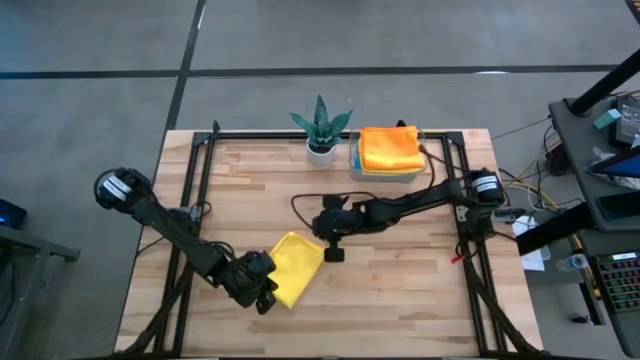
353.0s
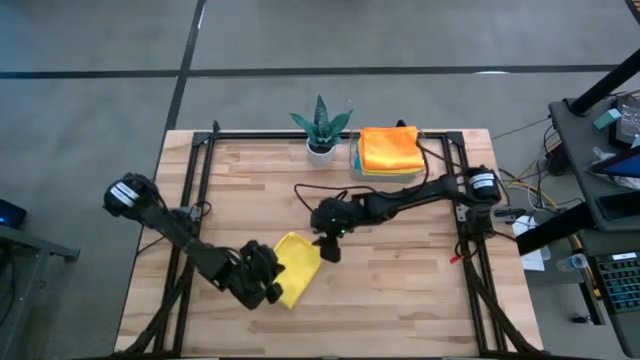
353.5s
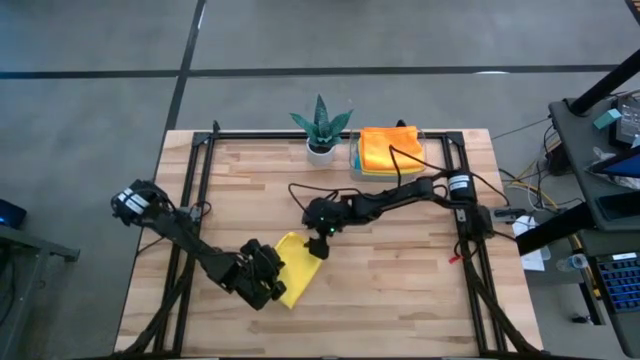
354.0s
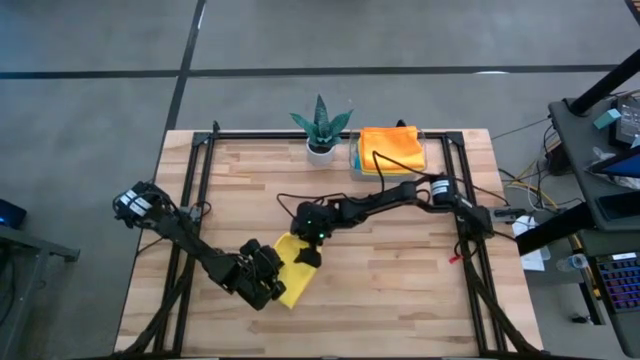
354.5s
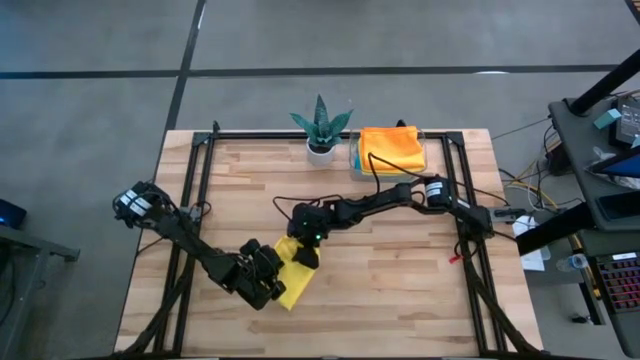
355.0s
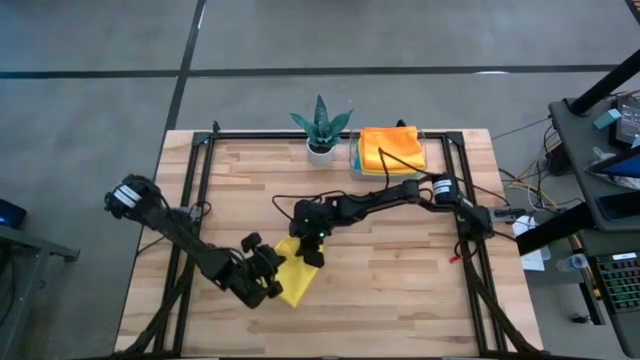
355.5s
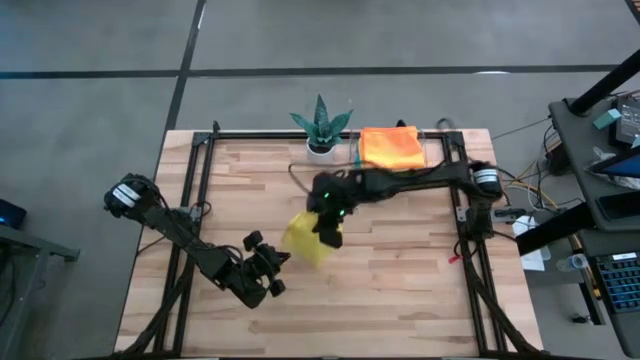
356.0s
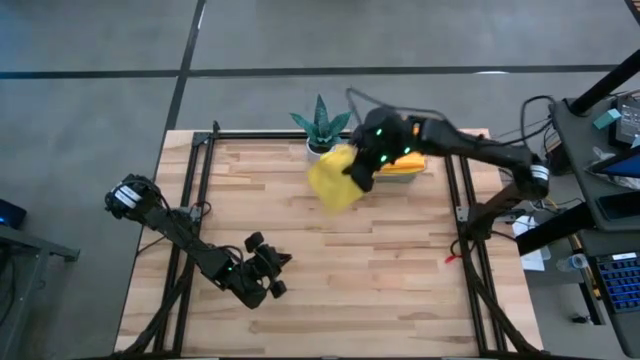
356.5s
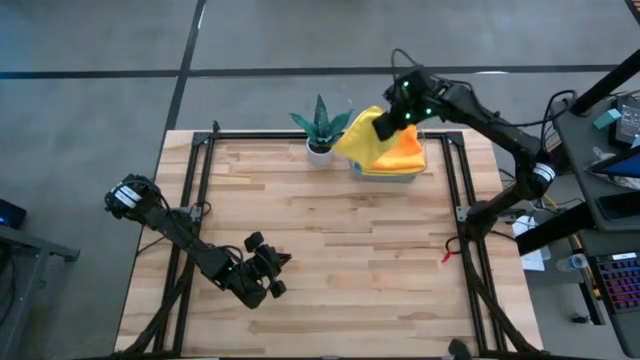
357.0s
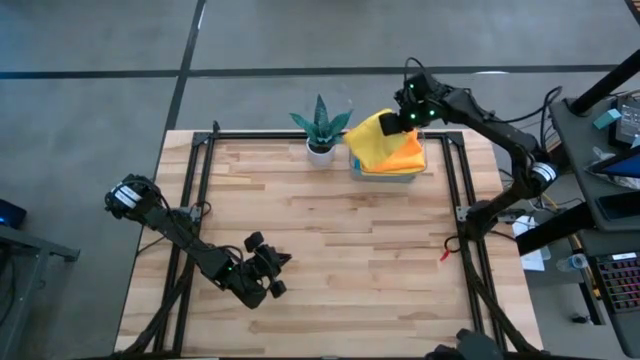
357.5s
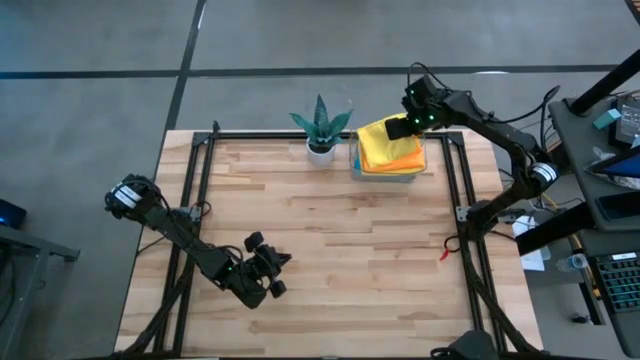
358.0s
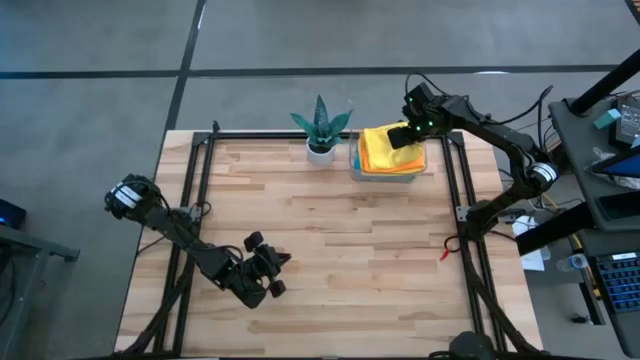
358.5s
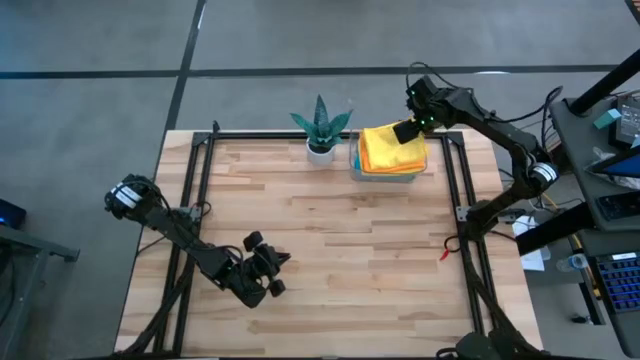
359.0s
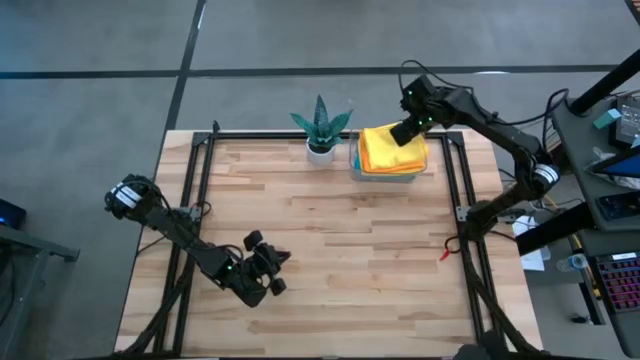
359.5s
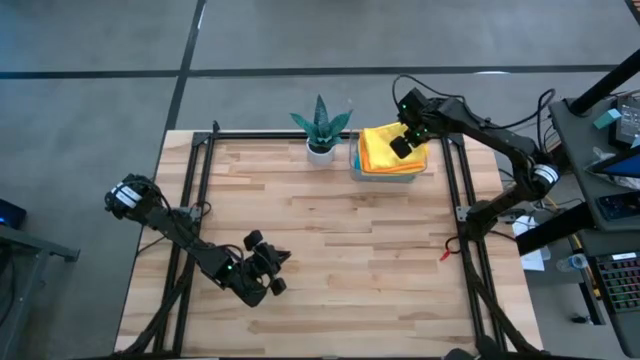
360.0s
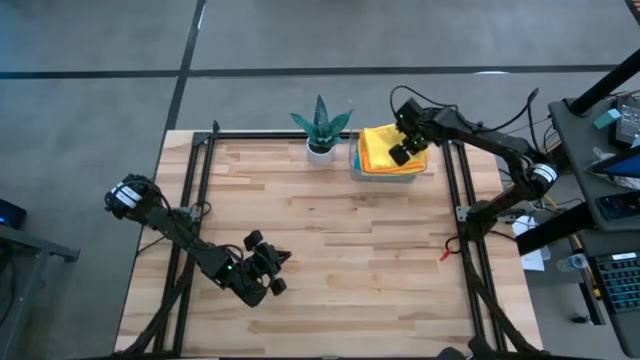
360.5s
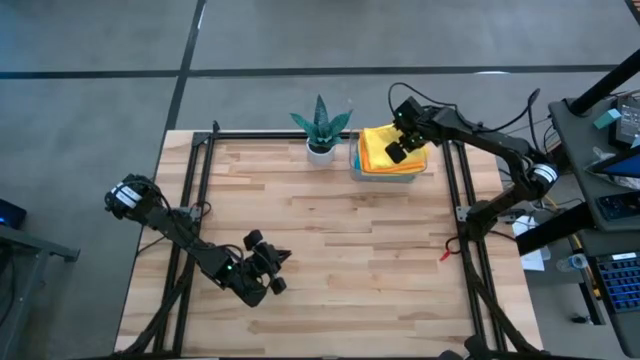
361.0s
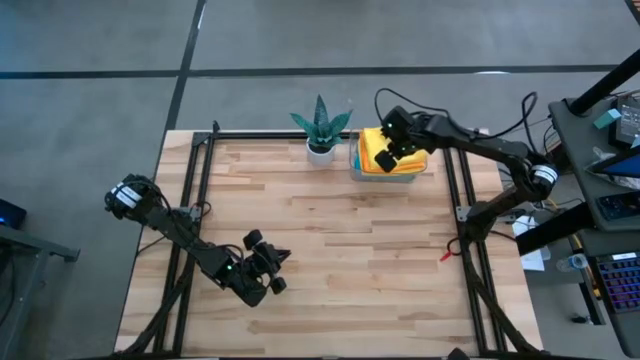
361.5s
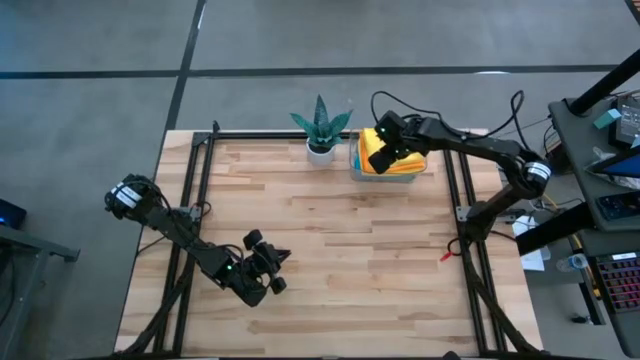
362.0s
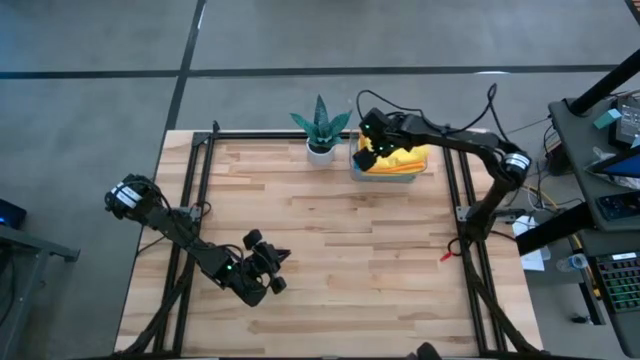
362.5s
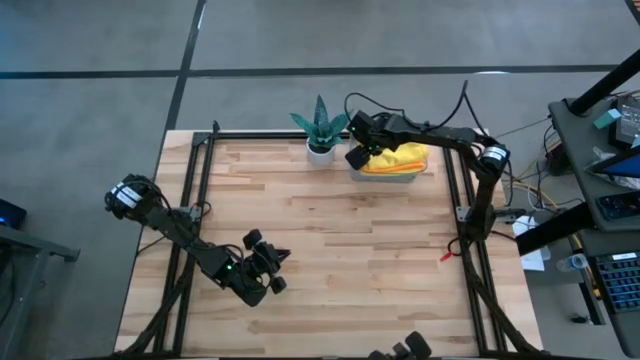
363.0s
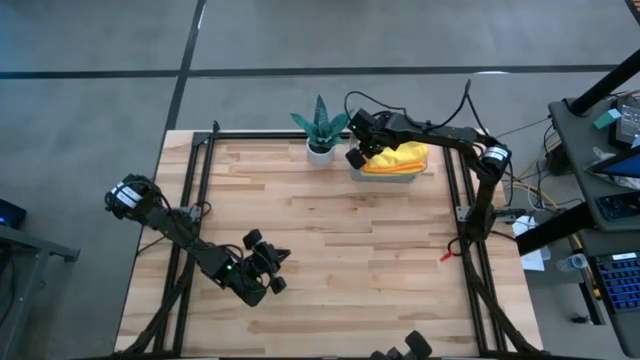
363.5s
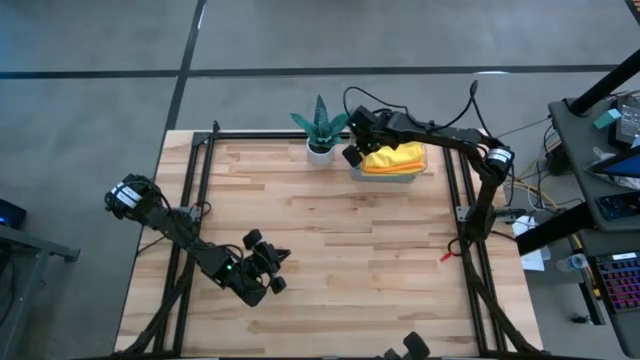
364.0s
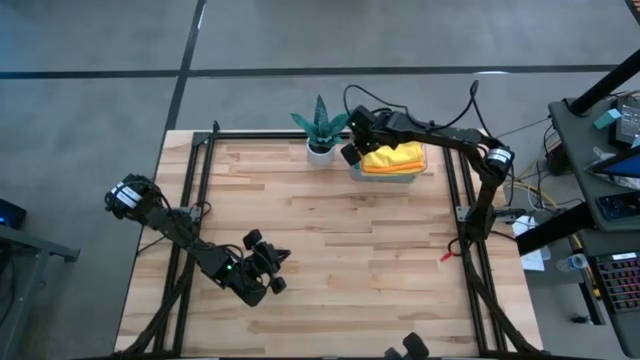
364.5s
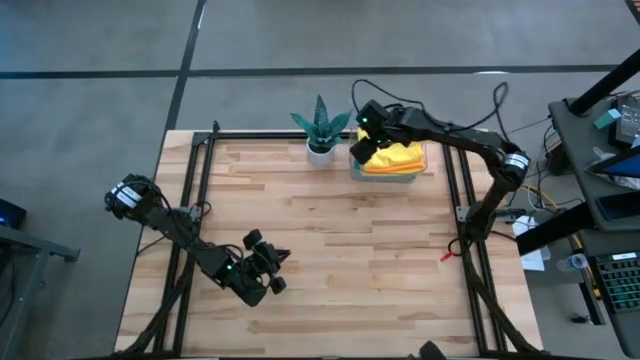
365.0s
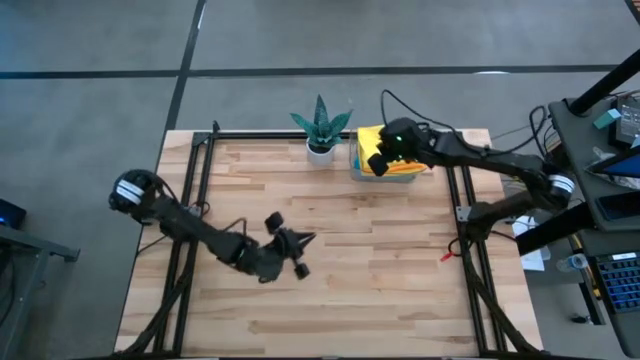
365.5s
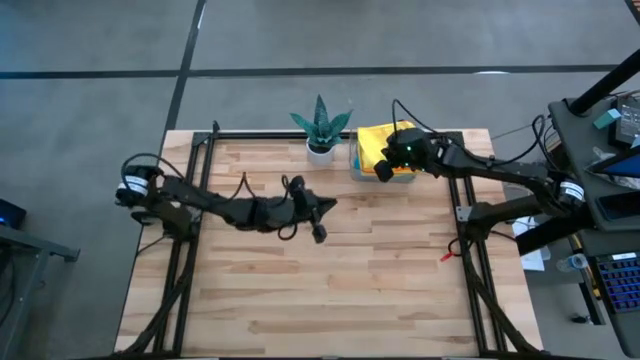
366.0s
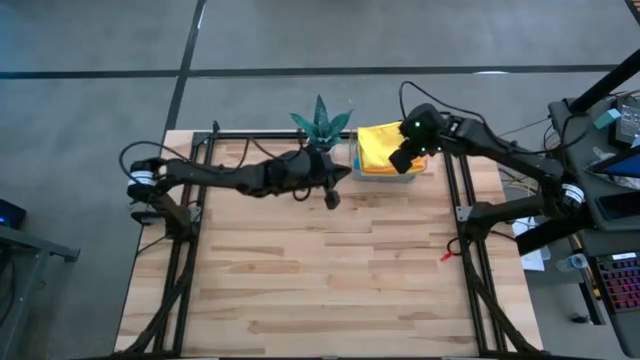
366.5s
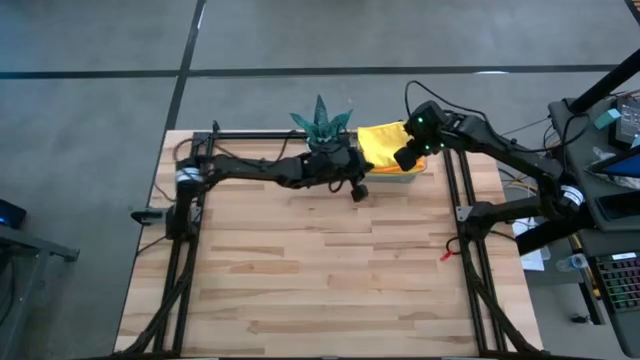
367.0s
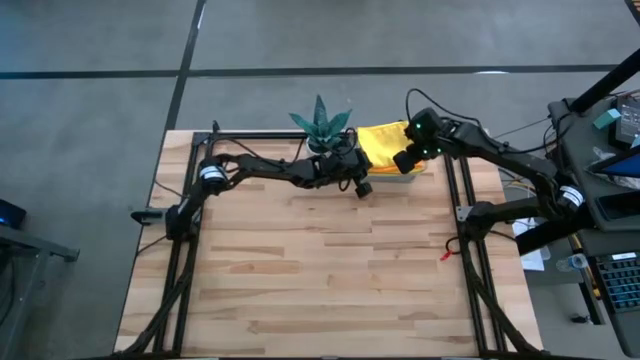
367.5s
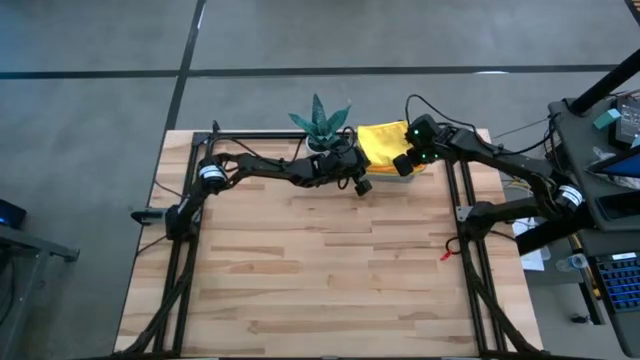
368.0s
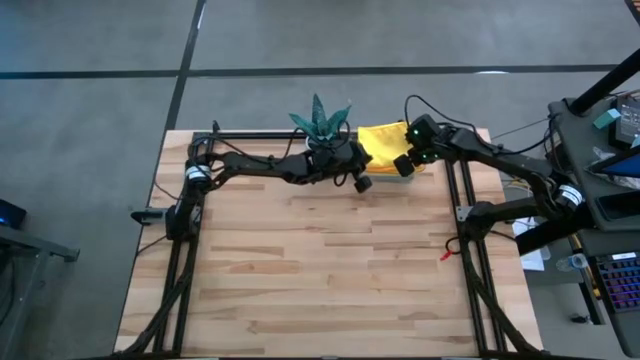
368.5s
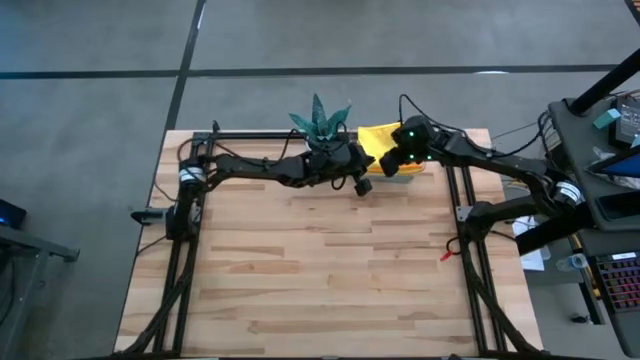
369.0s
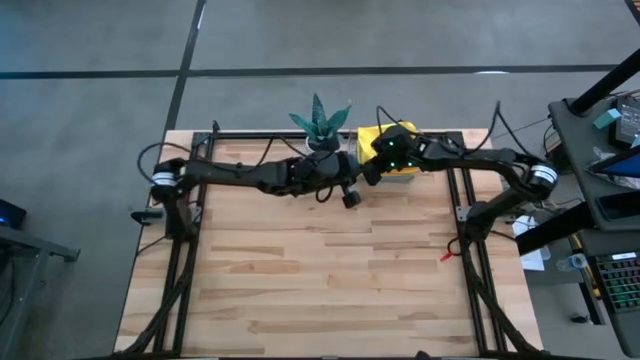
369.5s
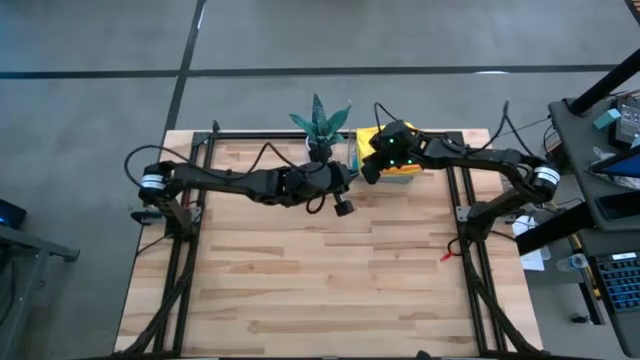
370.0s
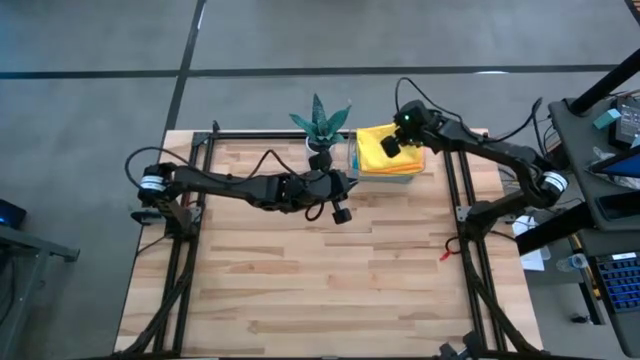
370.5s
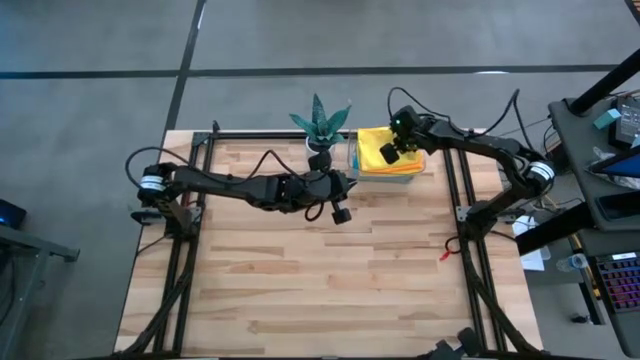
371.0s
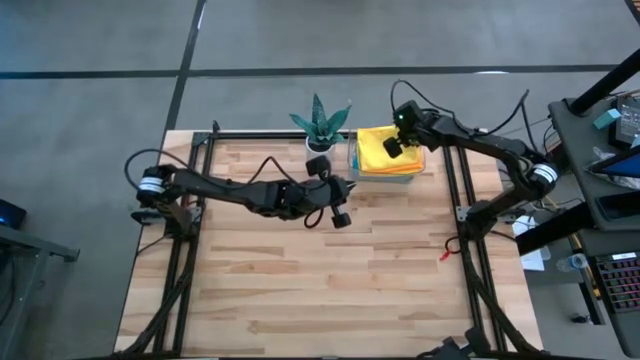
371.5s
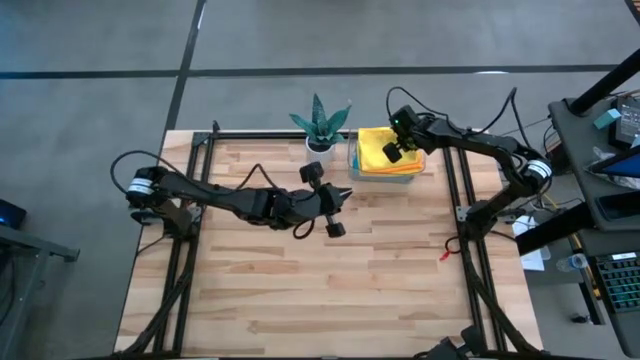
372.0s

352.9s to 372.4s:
Task: Fold microfiber towels
Put the yellow microfiber towel into the transparent bin
